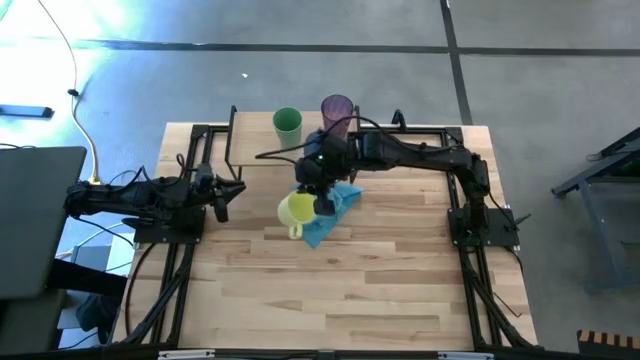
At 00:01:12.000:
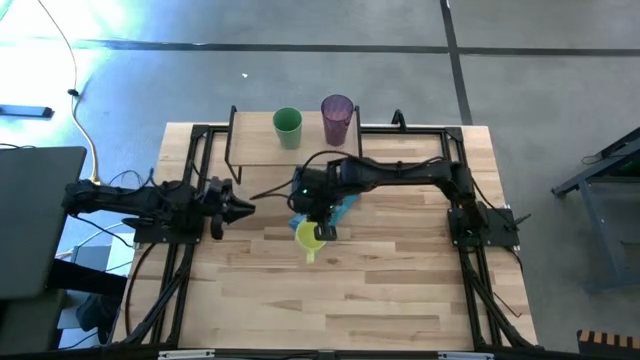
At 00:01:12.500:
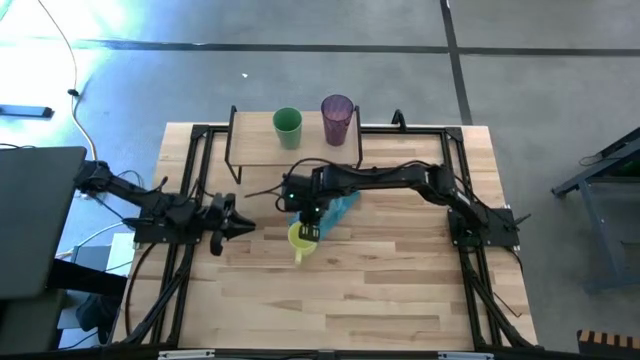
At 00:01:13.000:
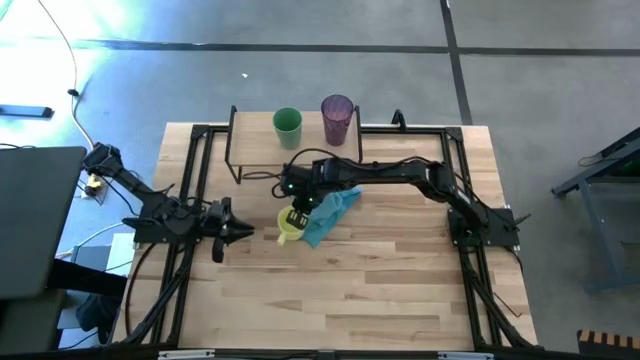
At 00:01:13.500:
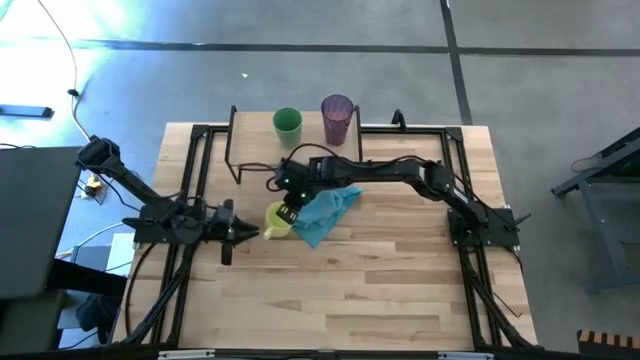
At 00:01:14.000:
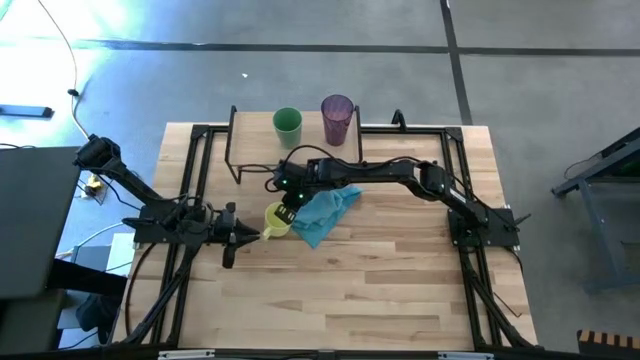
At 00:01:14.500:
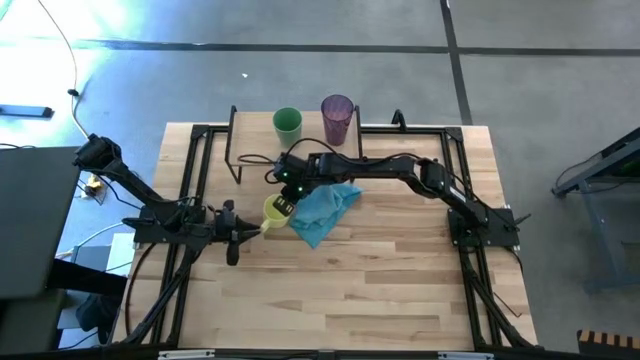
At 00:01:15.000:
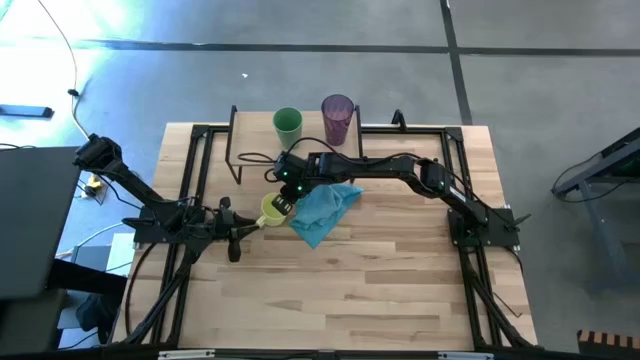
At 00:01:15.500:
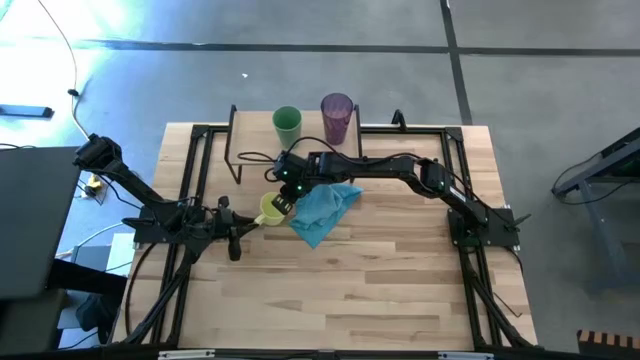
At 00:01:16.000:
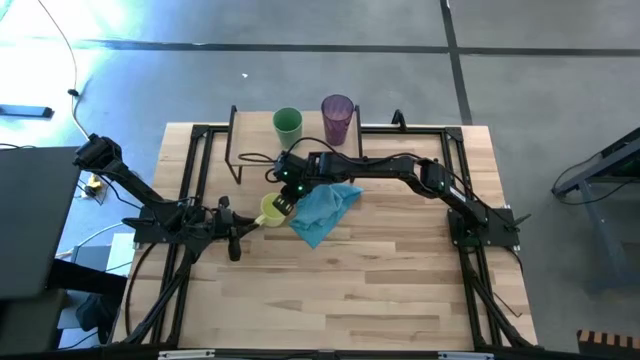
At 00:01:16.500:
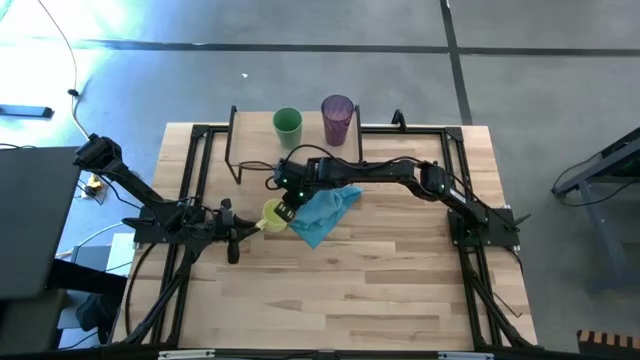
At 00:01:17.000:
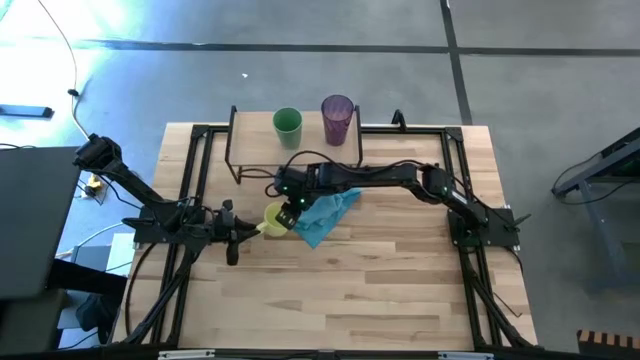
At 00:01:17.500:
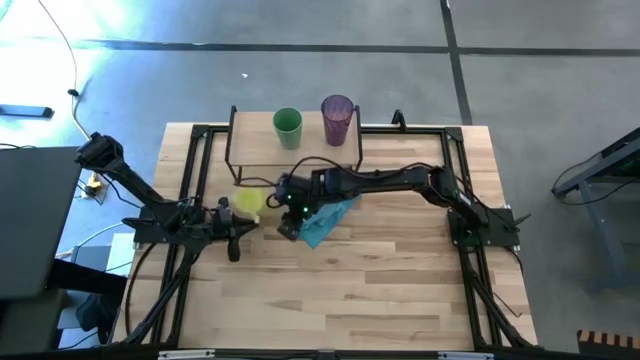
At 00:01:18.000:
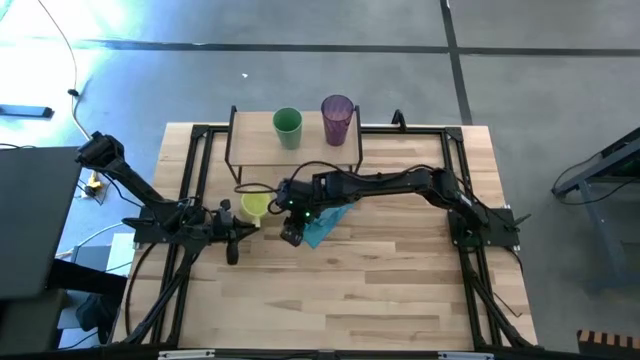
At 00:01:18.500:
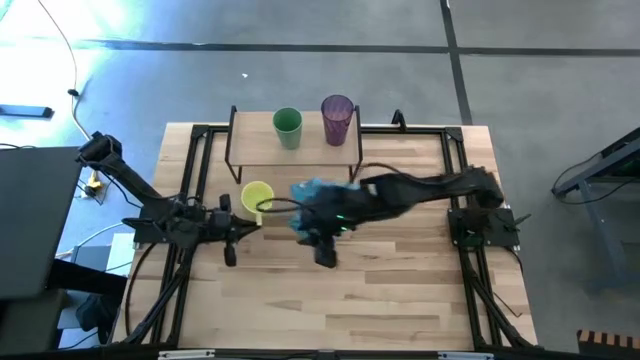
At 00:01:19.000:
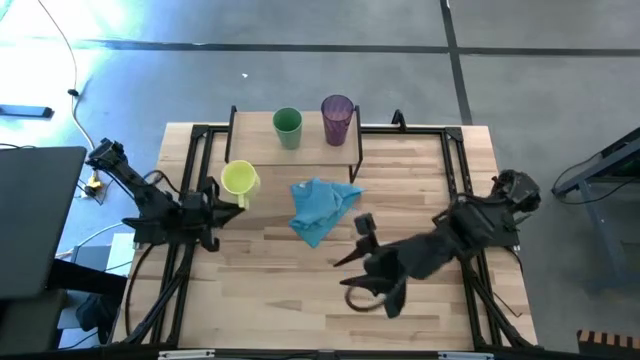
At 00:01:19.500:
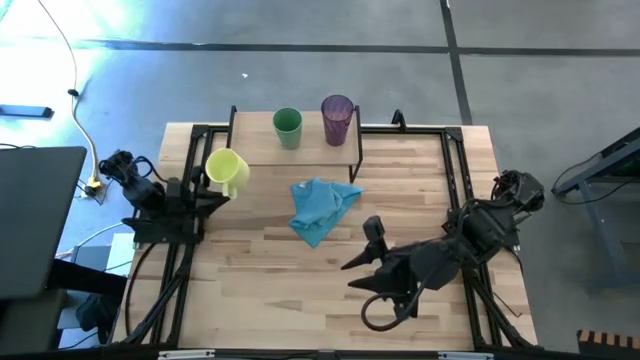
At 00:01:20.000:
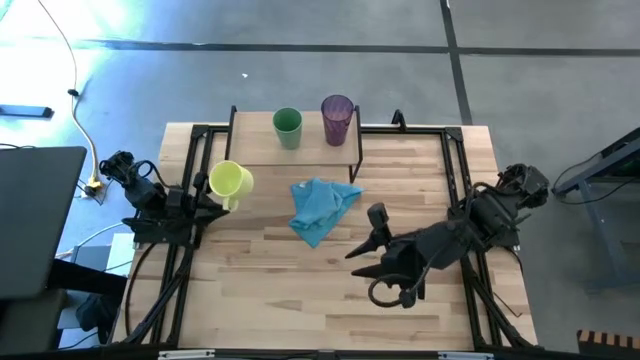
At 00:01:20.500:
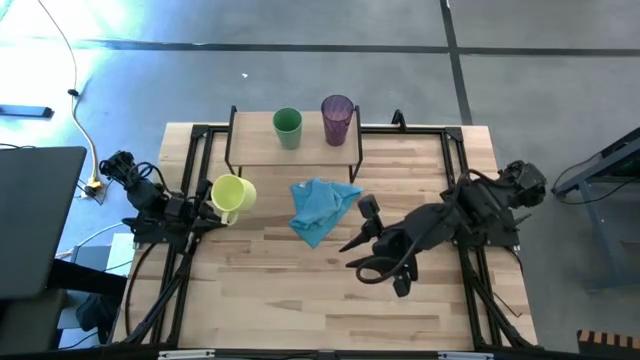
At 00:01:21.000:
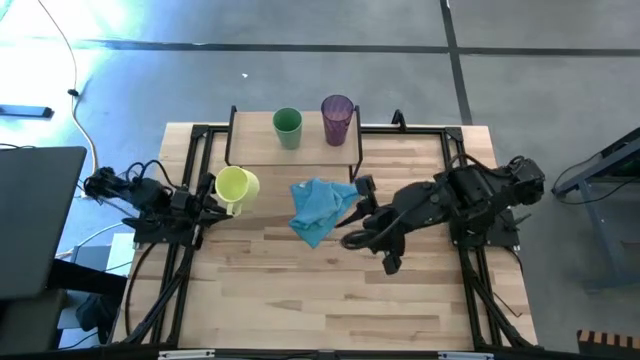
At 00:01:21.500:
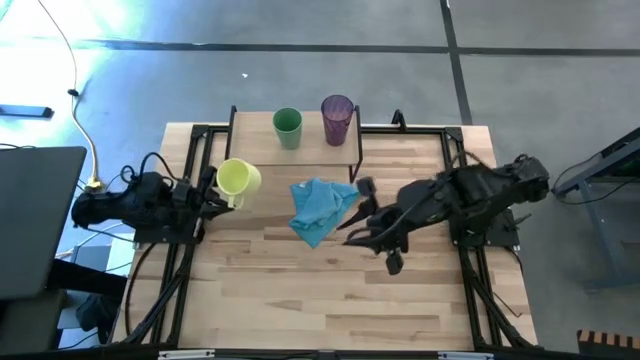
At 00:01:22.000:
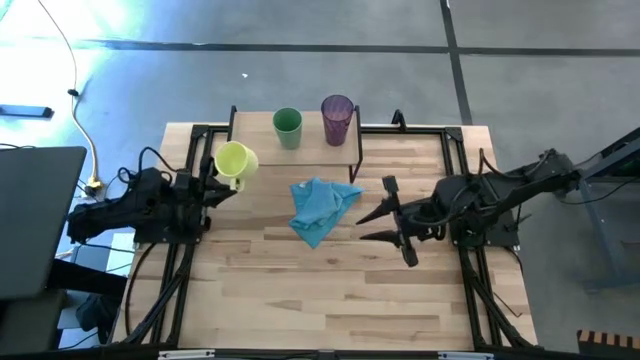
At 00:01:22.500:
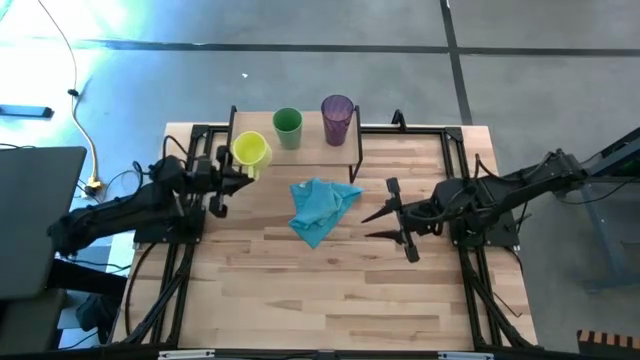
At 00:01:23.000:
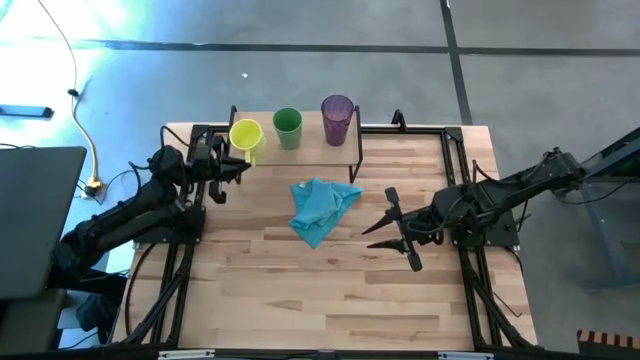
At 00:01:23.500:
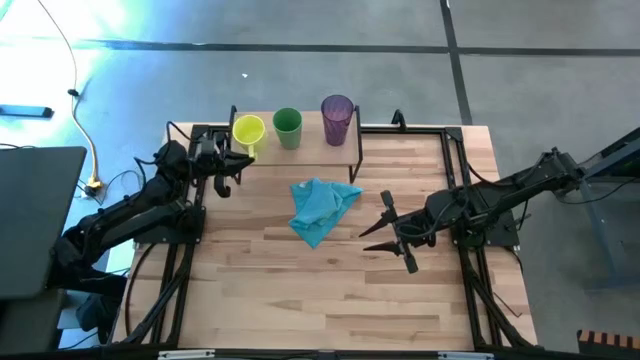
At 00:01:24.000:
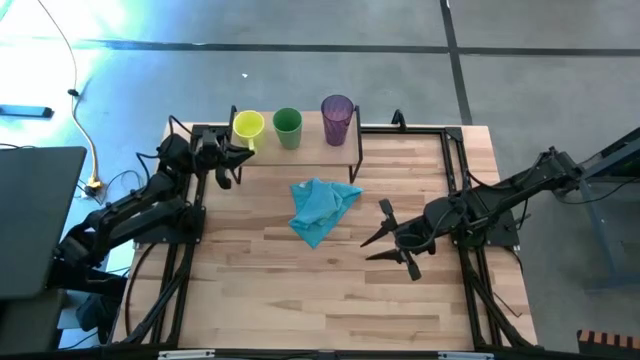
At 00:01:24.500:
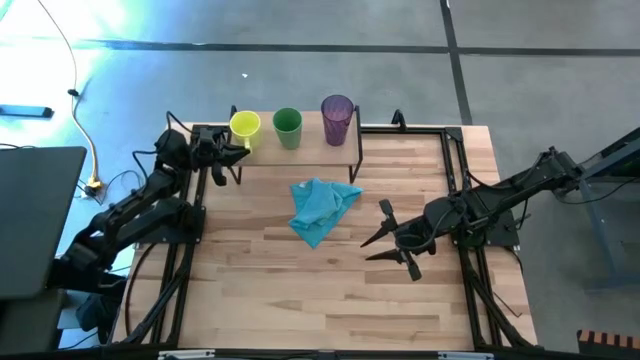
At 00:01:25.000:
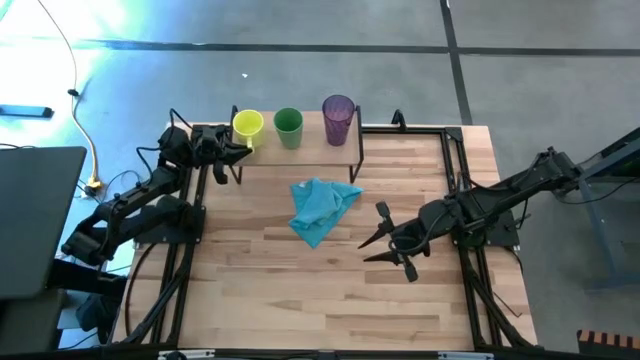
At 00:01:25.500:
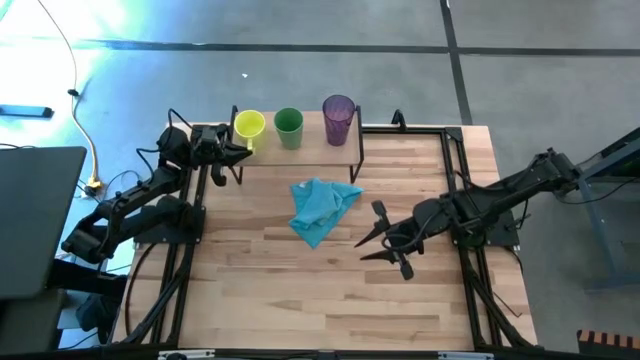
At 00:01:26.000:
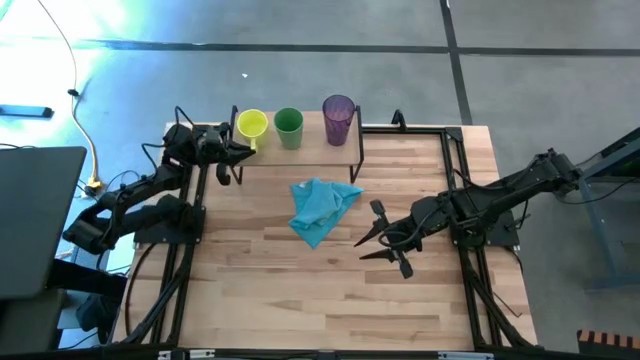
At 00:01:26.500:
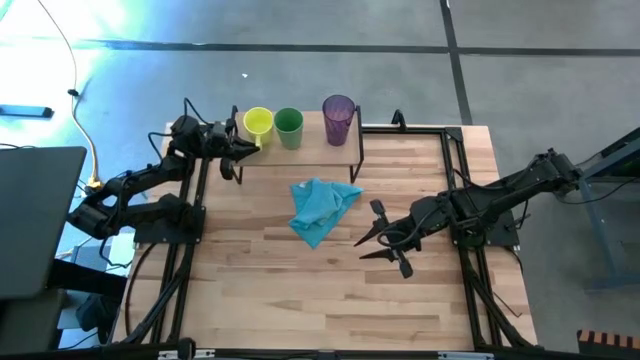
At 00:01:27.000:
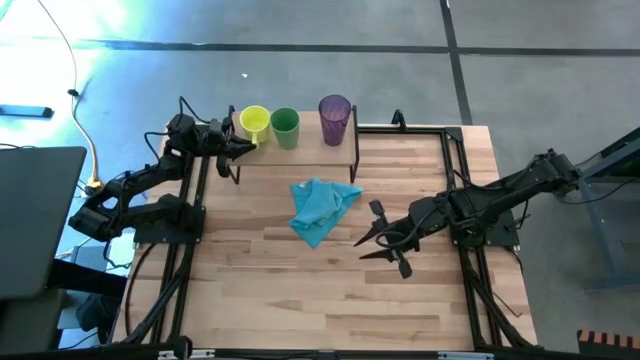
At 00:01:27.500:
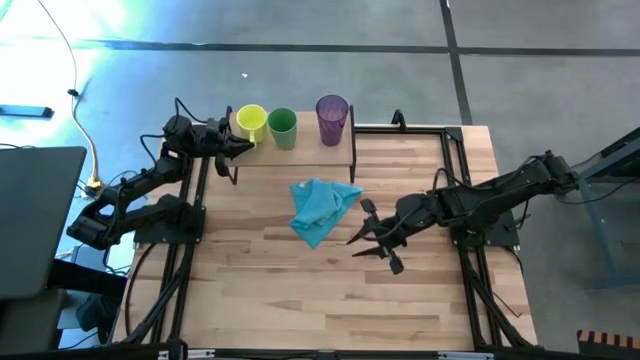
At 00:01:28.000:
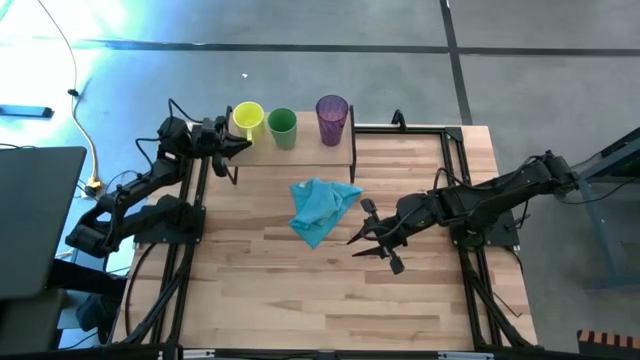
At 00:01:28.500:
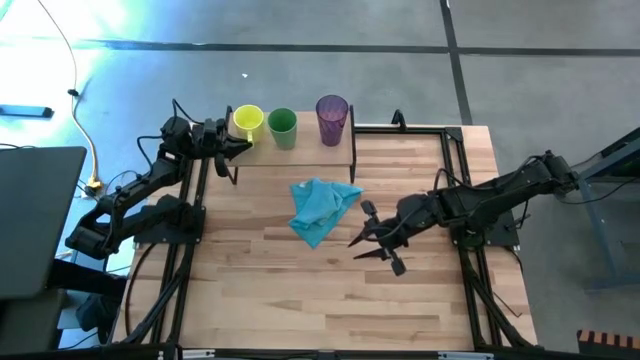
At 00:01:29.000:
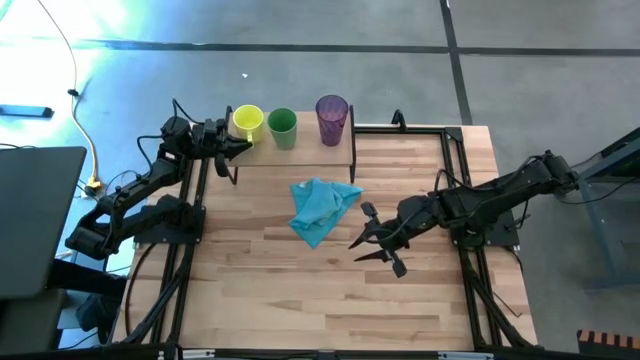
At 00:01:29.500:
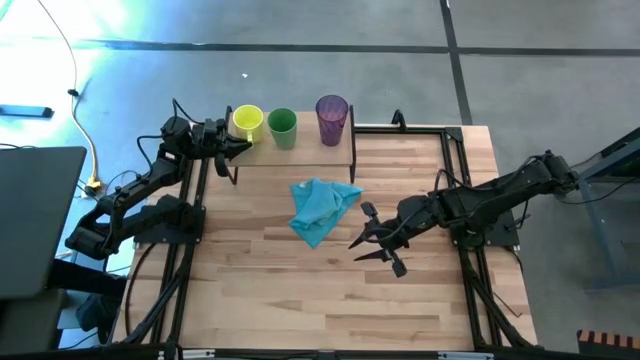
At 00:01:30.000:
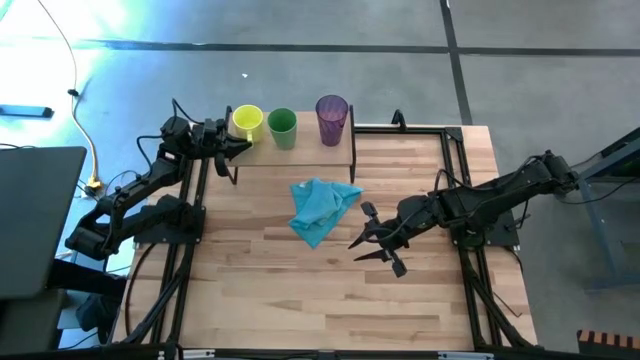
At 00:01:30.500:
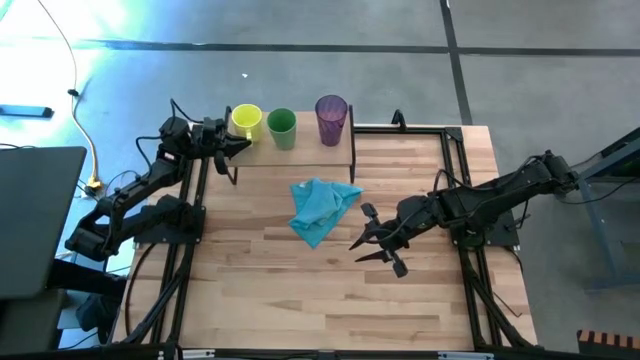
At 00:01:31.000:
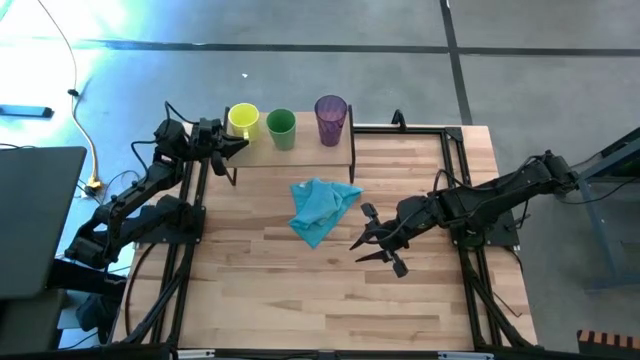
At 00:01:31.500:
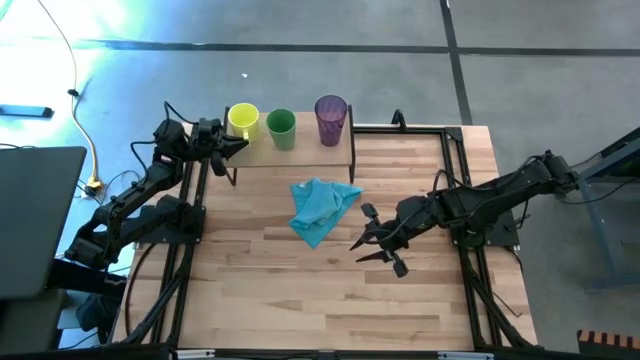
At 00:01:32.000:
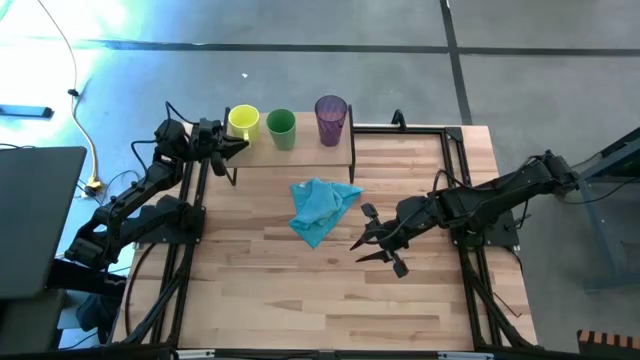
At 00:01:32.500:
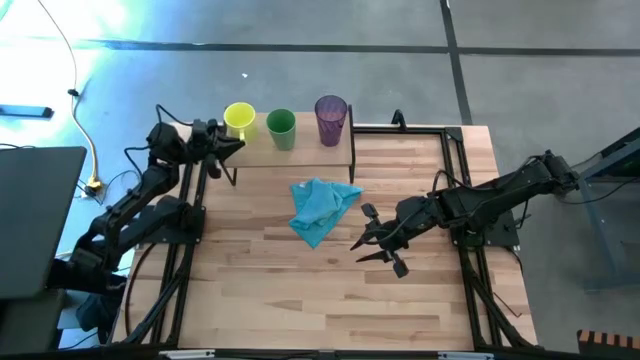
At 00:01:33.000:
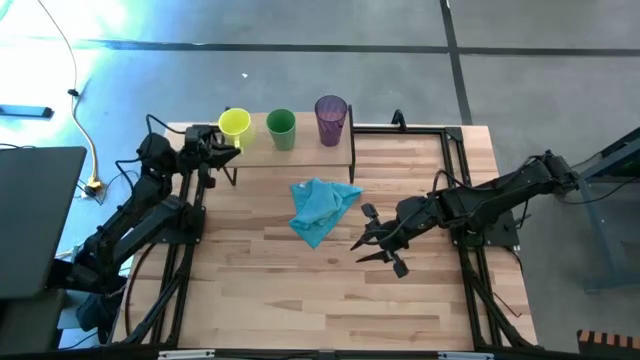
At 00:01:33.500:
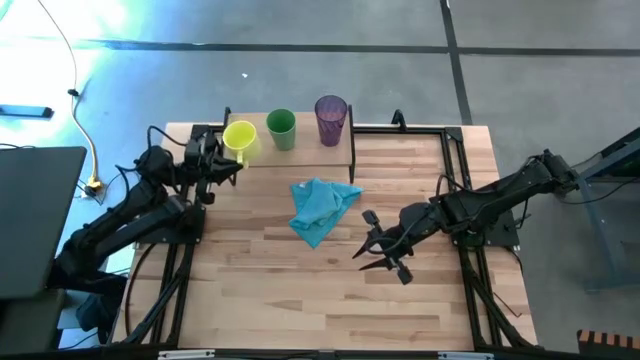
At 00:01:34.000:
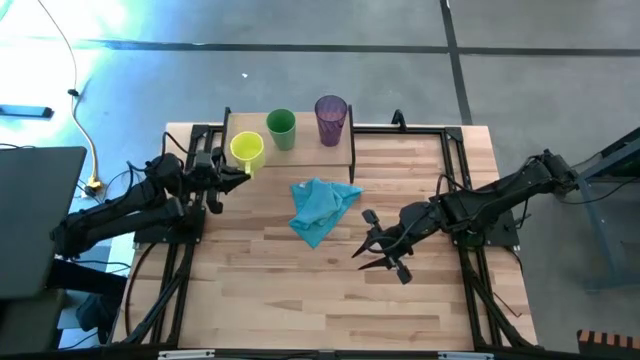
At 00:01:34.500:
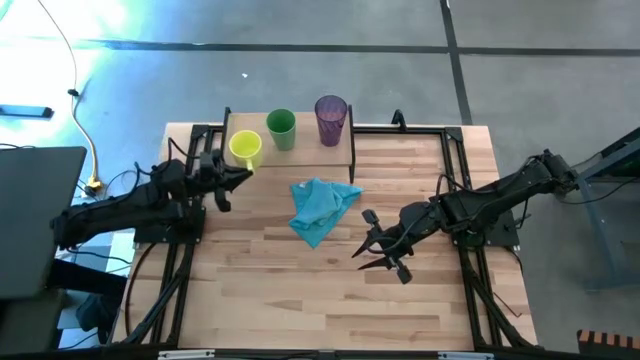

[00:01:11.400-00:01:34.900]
Task: Stack small to large cups/mugs on shelf
Put the yellow mug on the shelf
